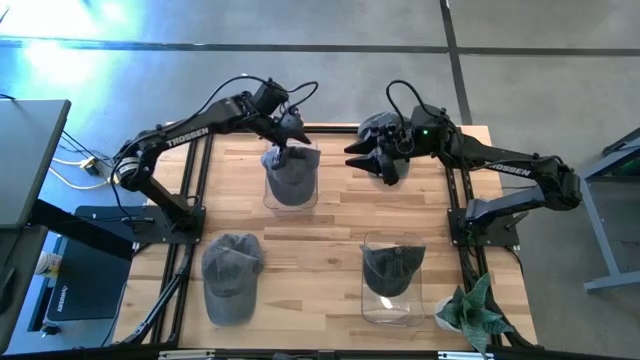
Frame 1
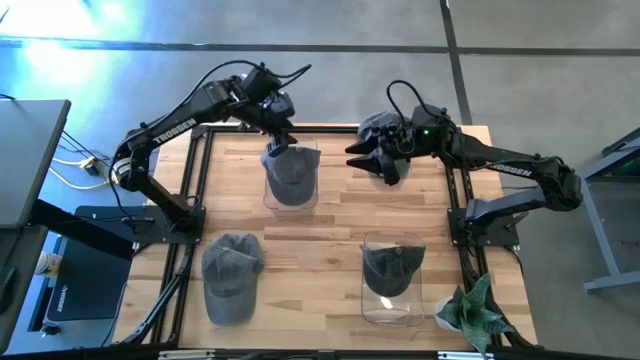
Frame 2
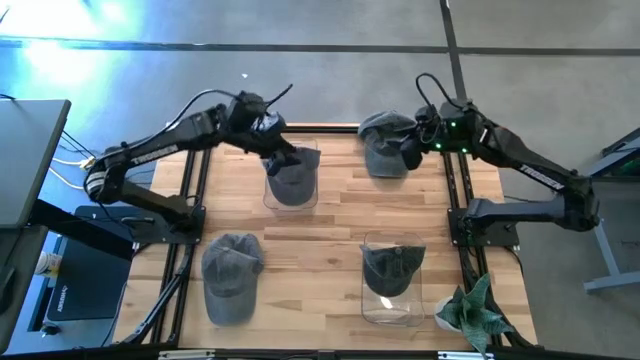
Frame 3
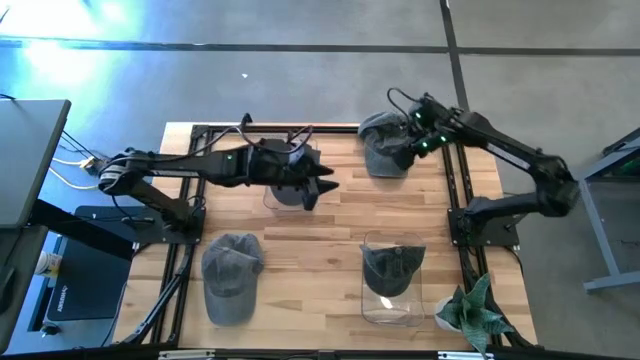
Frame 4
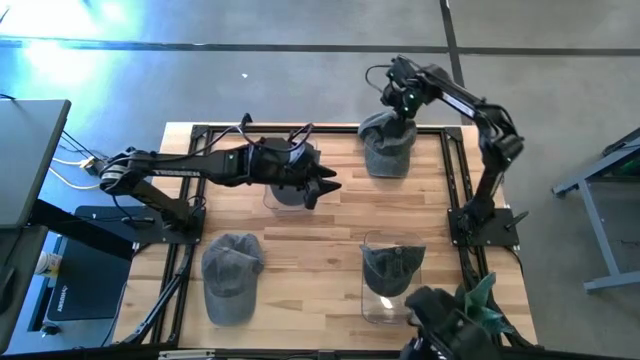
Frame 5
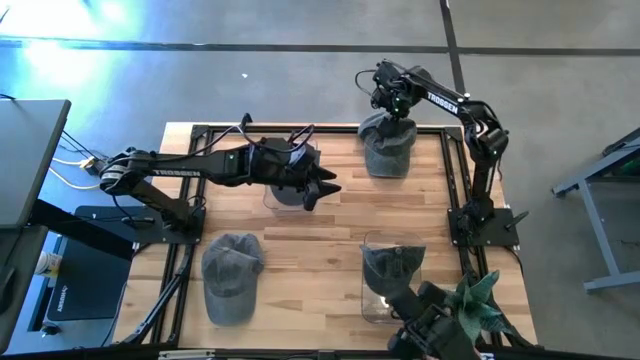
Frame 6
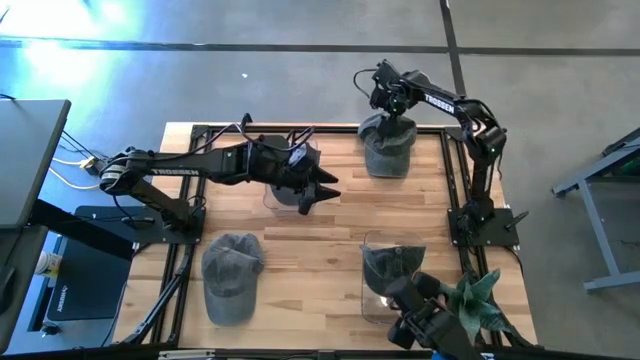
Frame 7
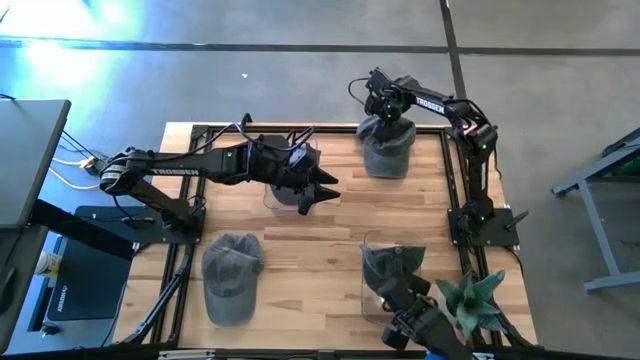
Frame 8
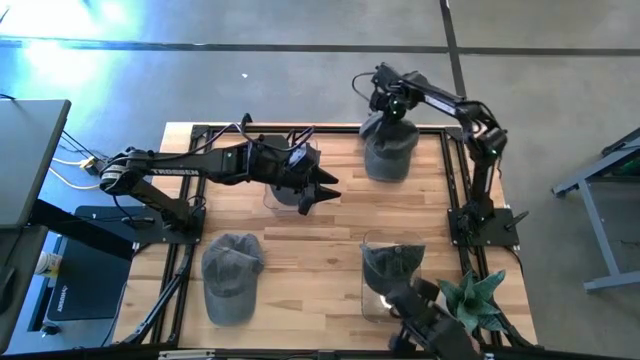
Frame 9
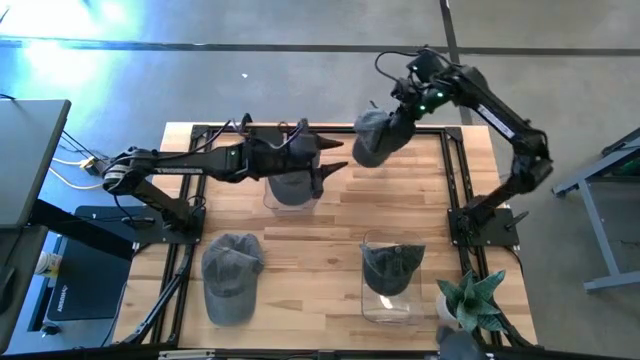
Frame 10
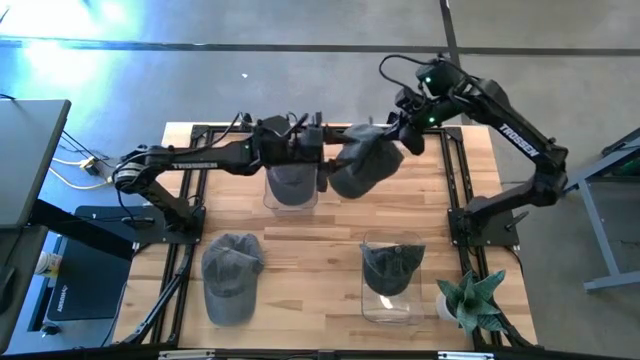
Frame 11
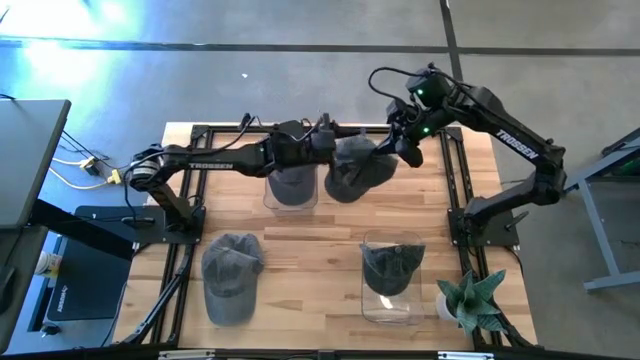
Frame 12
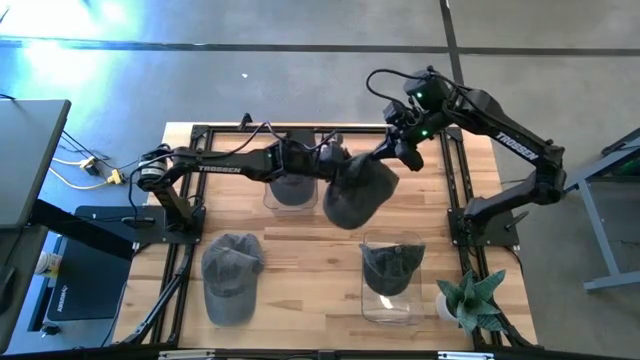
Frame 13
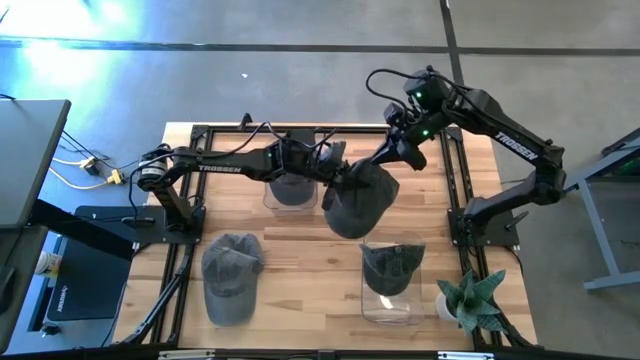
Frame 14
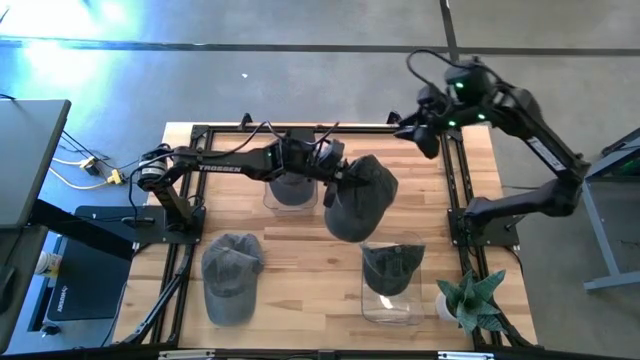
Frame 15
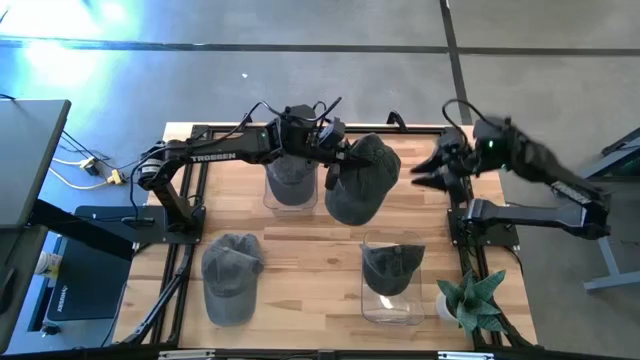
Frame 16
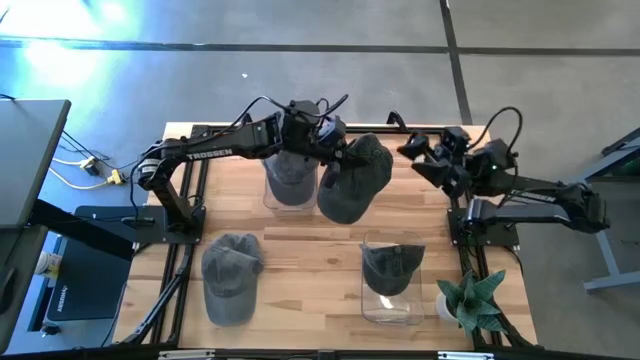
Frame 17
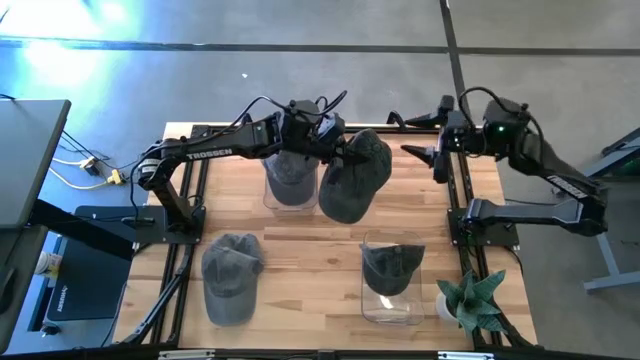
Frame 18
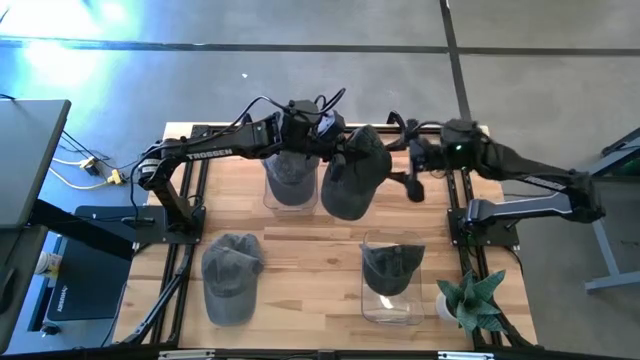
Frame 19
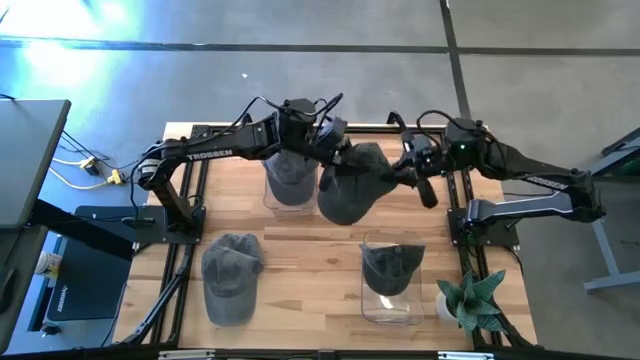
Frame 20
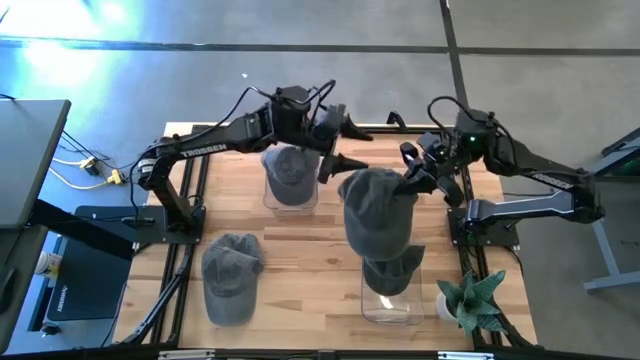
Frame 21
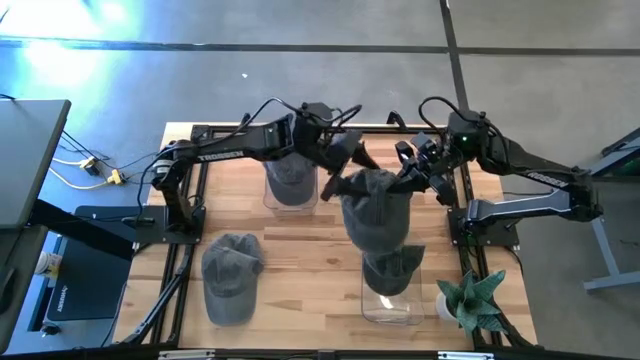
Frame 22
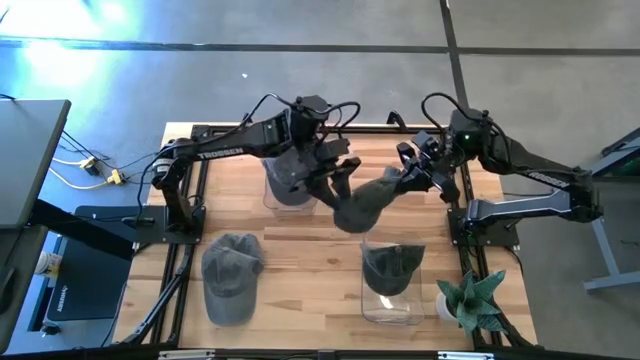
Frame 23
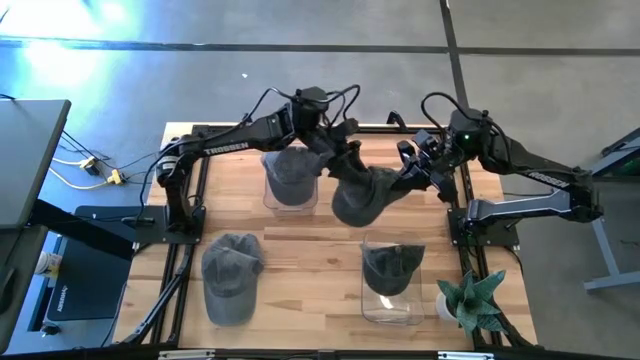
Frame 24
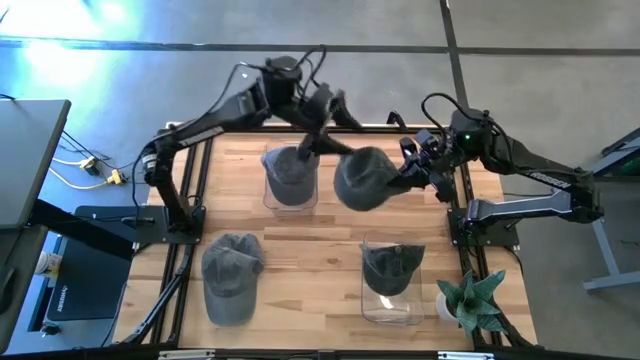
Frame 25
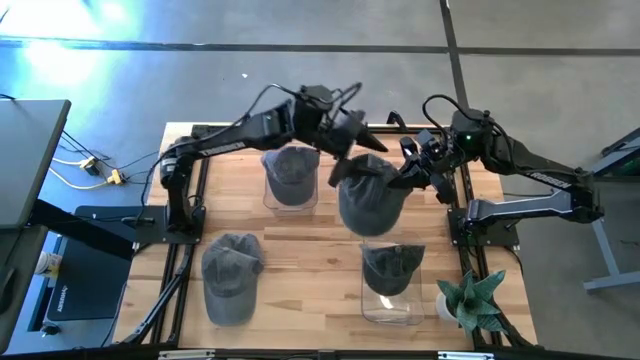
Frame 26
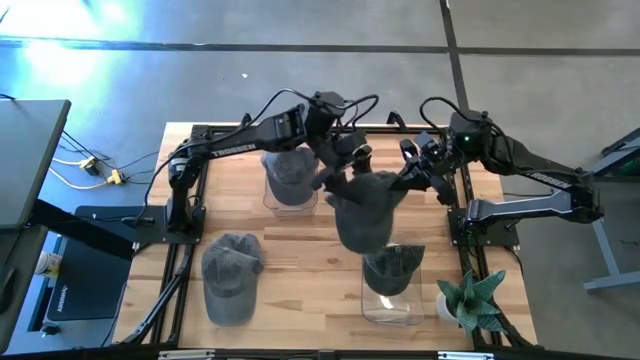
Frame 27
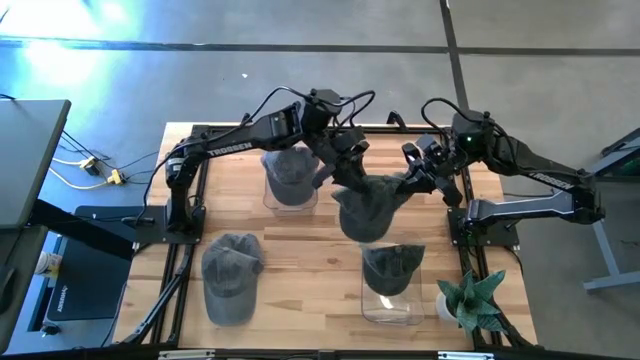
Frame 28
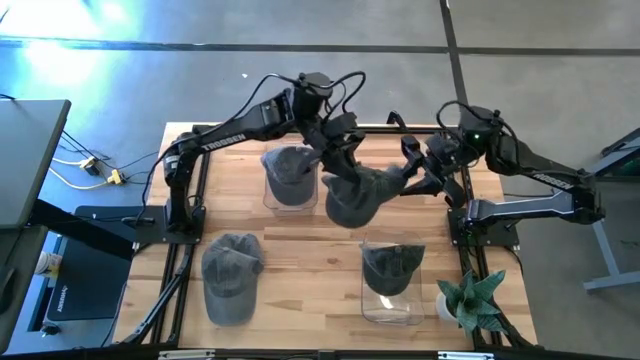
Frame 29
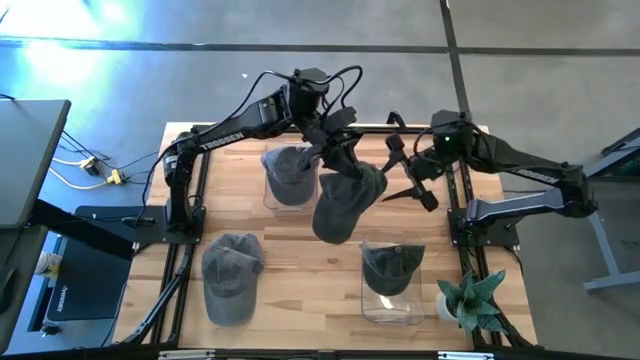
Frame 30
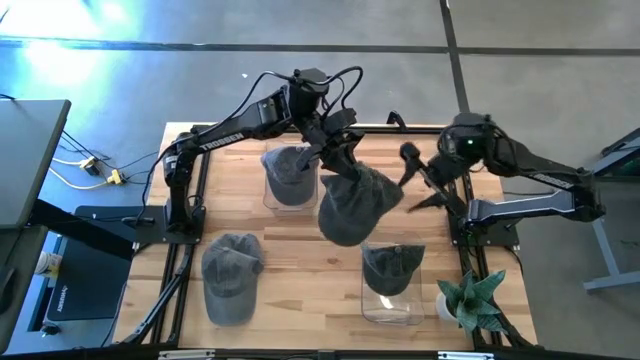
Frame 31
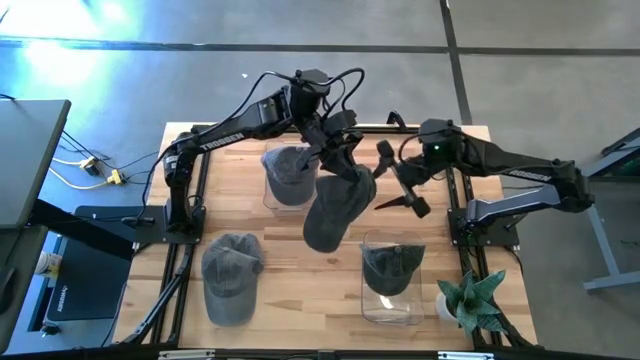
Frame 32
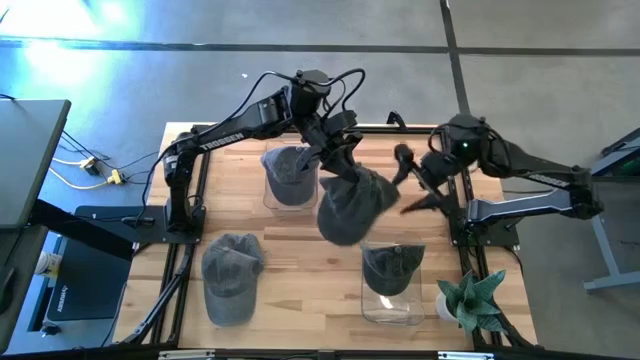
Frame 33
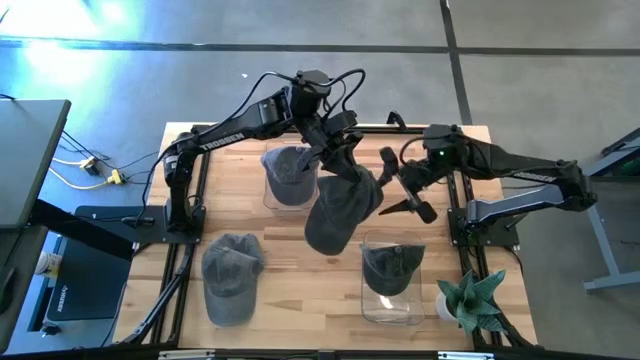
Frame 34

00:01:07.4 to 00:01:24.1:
Task: Pick & Place hat
Put the dark gray cap into the bottom transparent bin

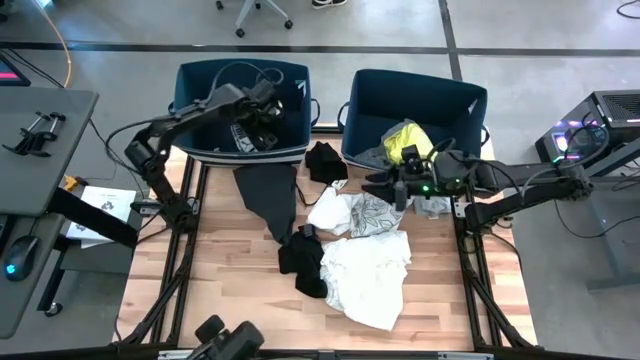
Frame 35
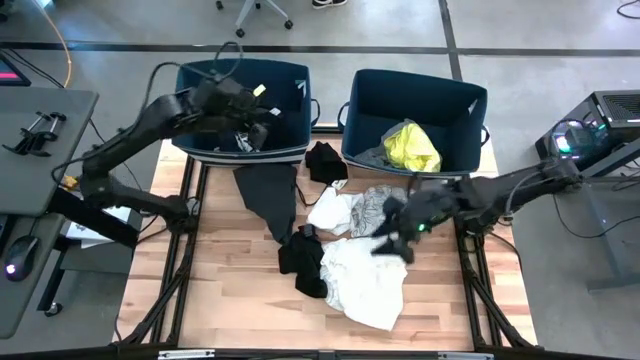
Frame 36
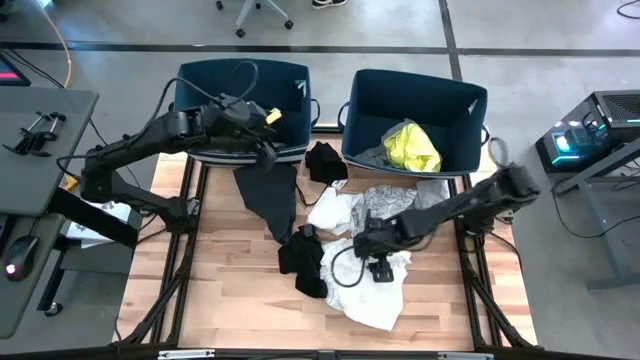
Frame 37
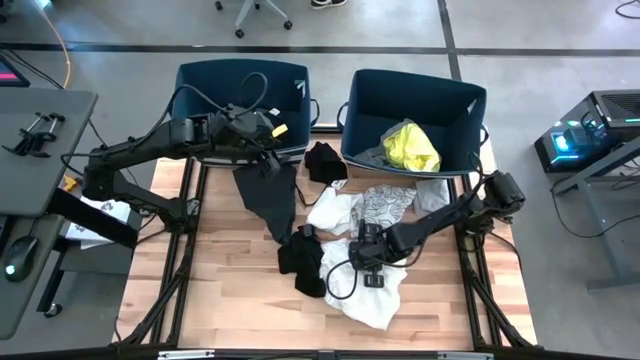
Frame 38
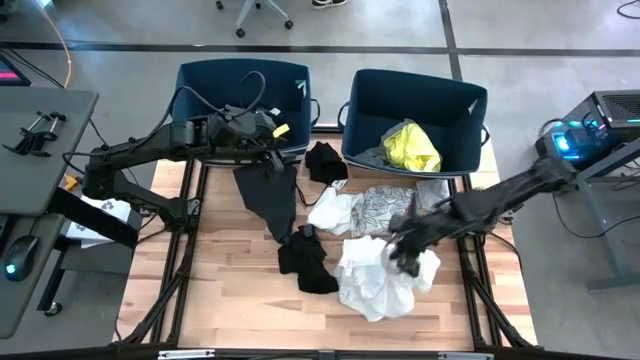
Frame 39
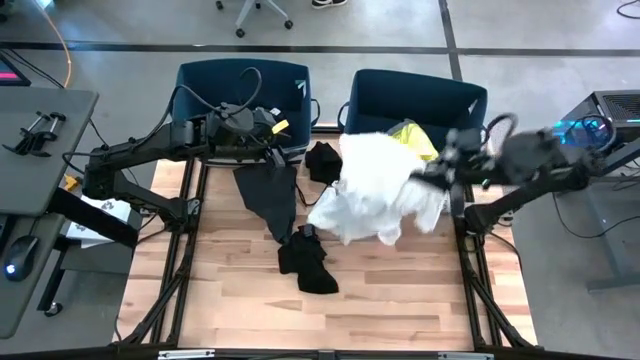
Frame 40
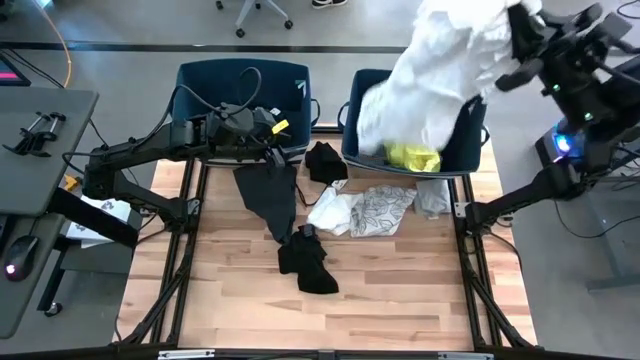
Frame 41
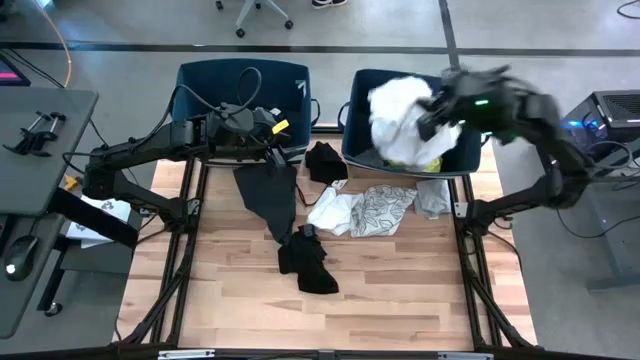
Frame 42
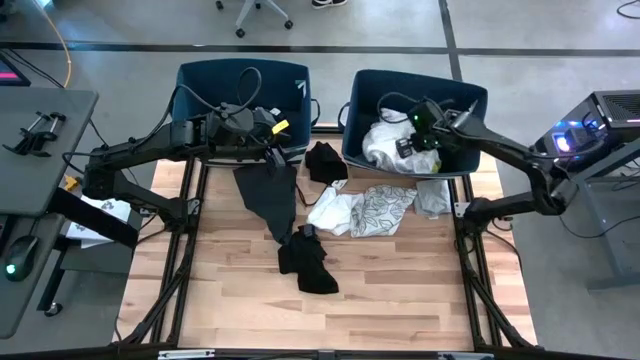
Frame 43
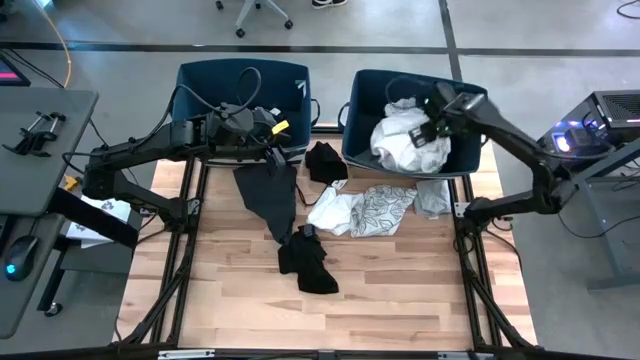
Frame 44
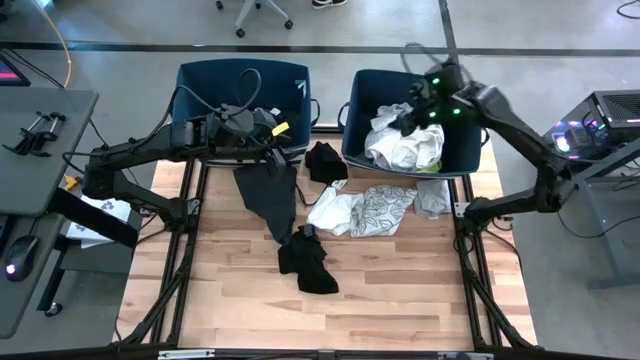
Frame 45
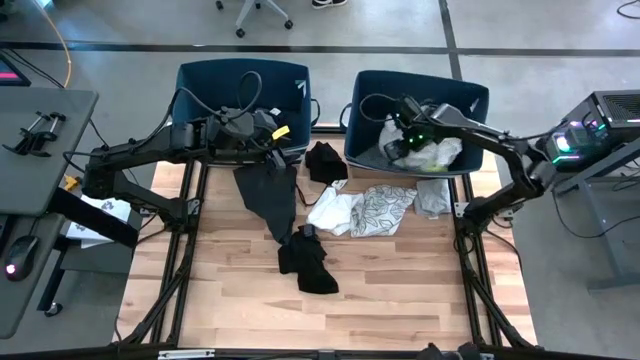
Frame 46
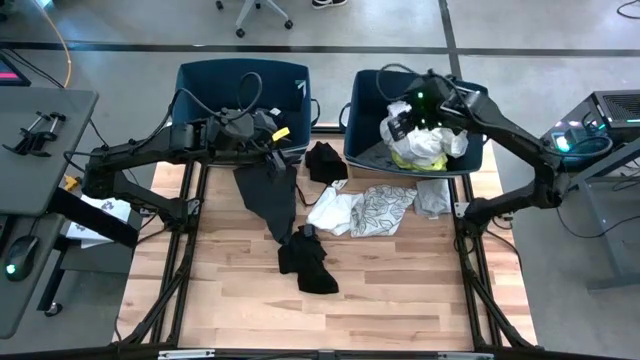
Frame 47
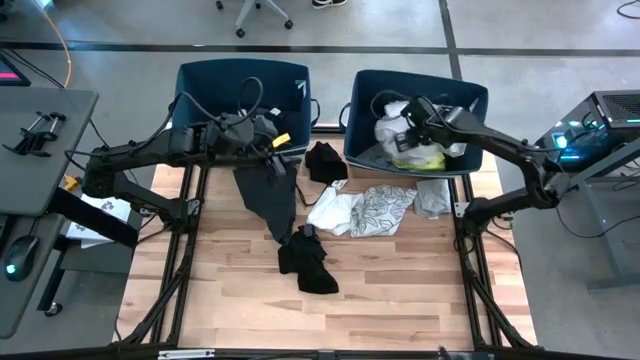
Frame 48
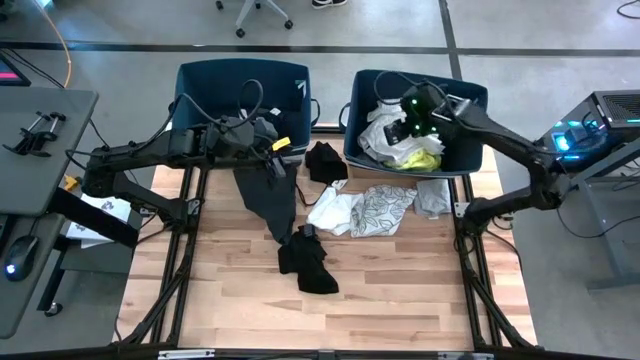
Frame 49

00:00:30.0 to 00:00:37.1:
Task: Sort clothes
Put the white dress into the right laundry bin
